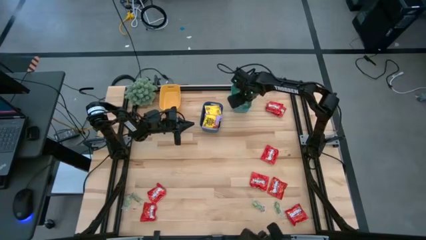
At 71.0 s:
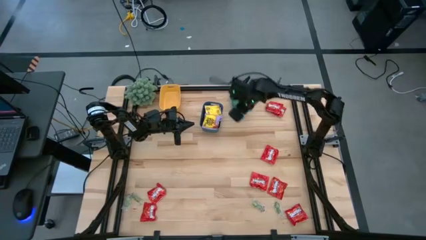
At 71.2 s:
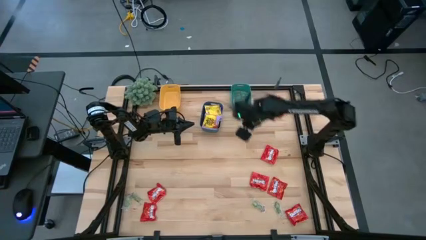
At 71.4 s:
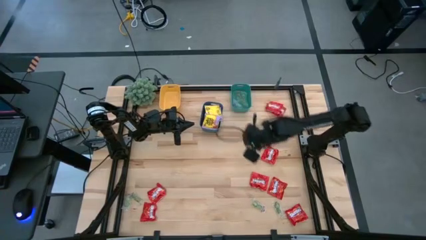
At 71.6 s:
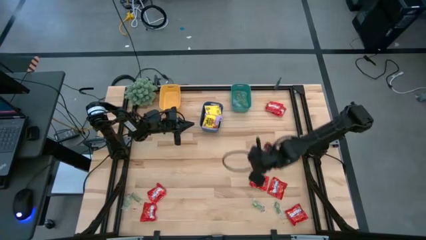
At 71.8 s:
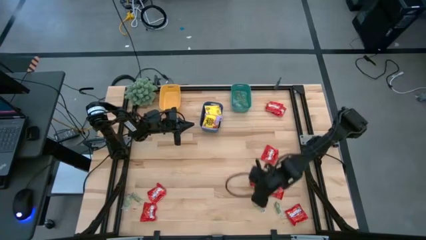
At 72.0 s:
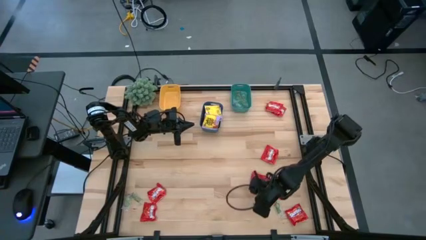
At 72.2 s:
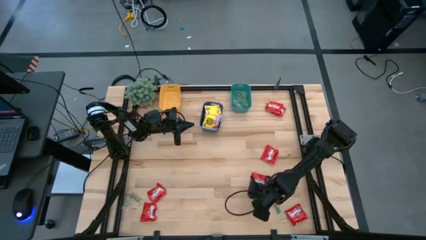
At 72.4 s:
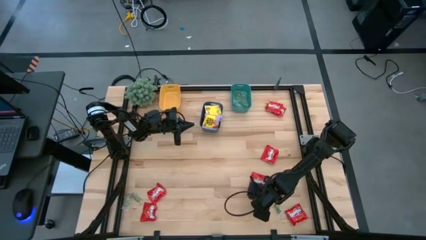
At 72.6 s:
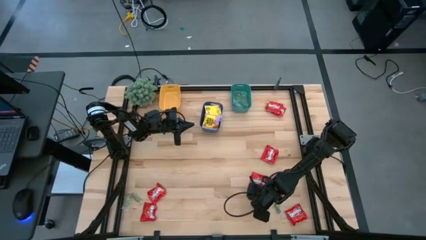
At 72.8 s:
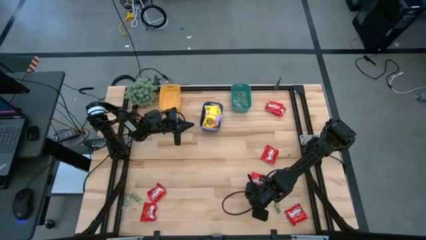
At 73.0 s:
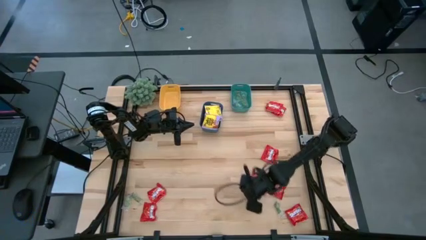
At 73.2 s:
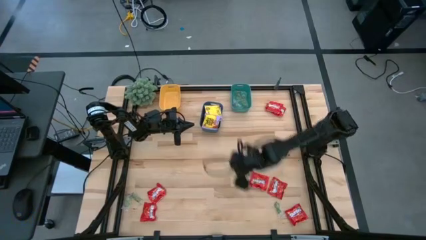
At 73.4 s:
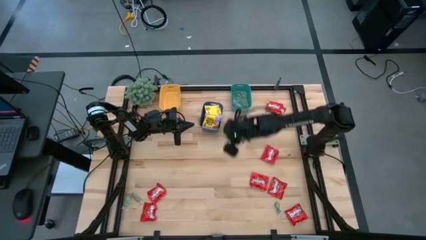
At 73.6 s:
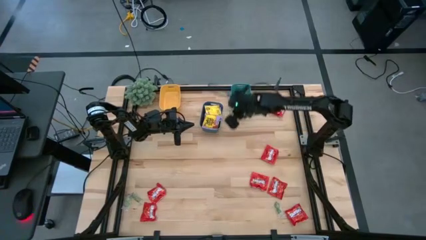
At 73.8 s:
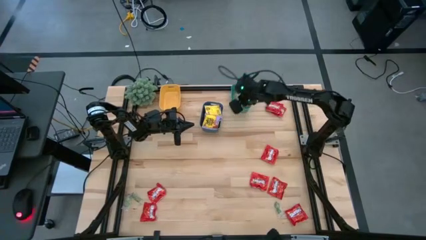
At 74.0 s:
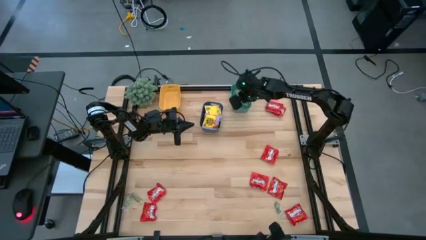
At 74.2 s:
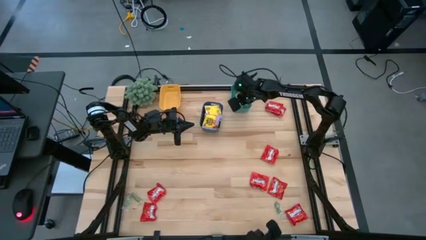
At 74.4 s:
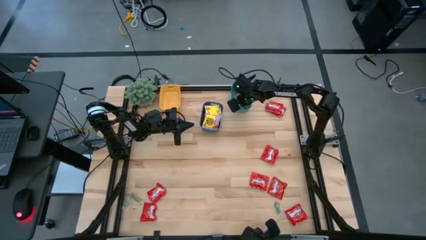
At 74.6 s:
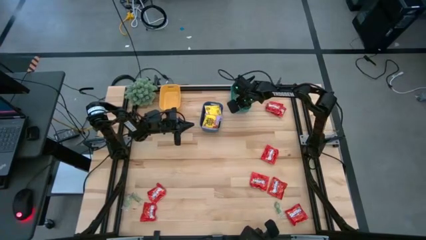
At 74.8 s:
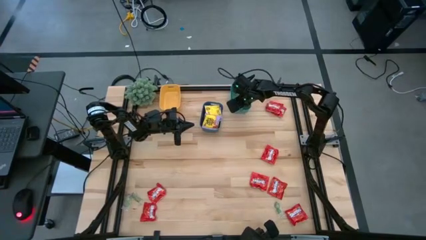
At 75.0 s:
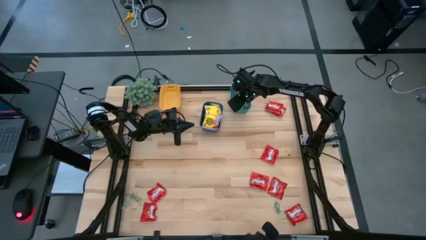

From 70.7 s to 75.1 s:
Task: Sort candy
Put the green gummy into the green bin

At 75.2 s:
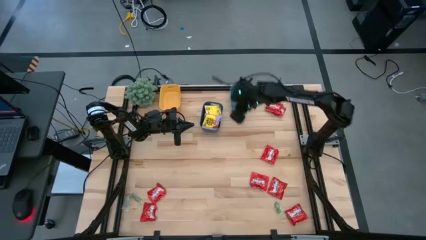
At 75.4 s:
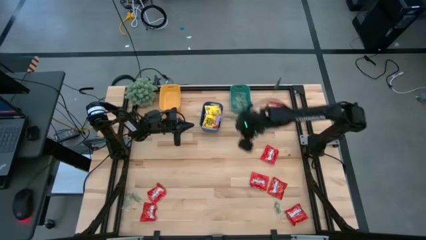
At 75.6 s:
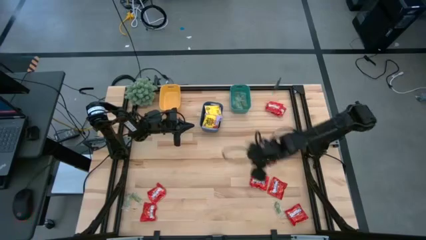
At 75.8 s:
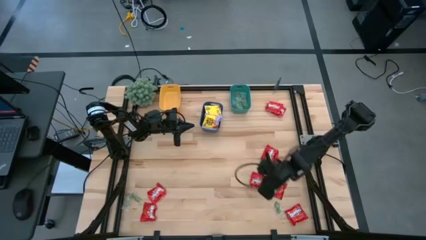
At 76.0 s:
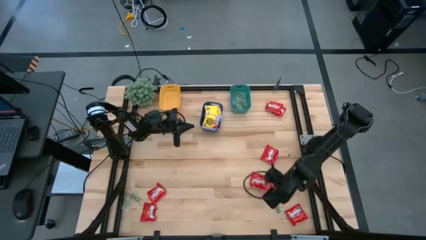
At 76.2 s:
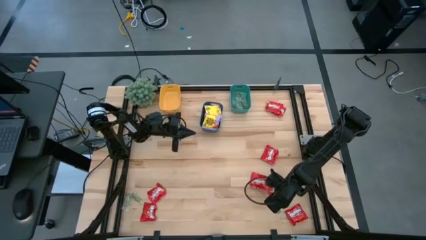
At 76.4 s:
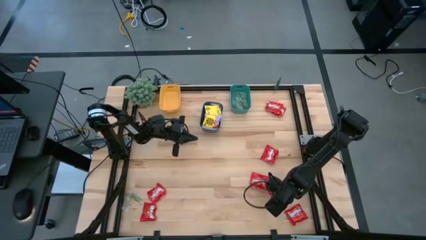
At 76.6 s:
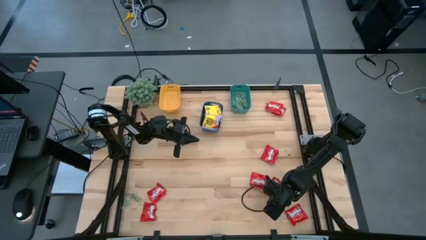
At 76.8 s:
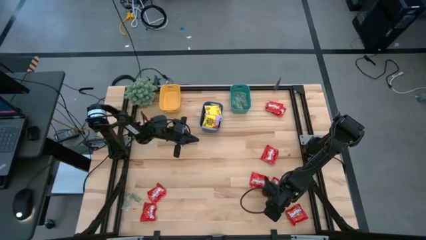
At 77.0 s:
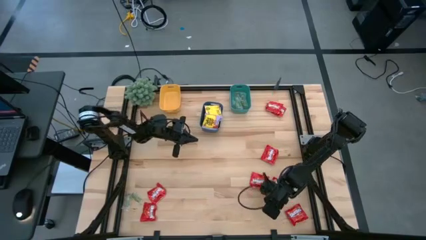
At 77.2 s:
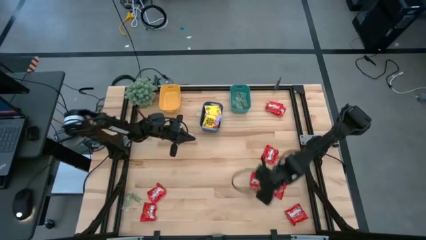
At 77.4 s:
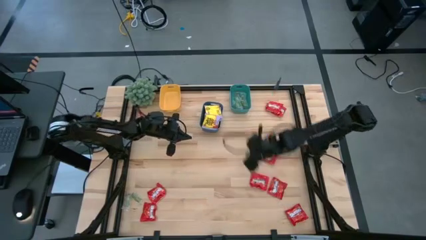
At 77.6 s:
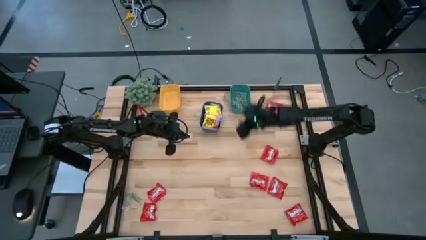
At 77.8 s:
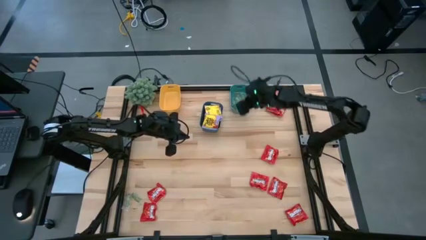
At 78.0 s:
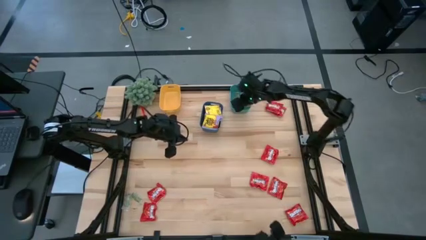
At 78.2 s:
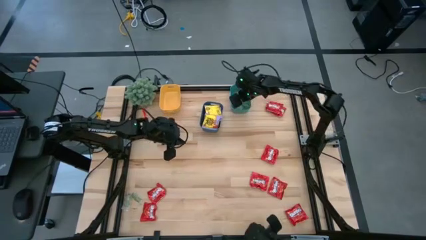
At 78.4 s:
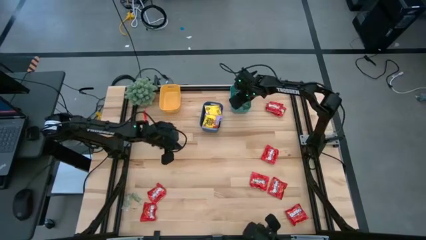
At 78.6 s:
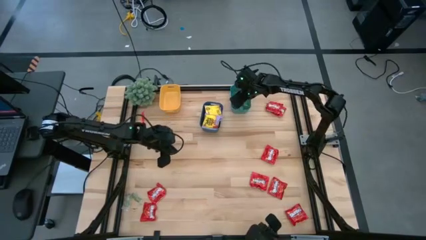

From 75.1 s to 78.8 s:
Put the green gummy into the green bin

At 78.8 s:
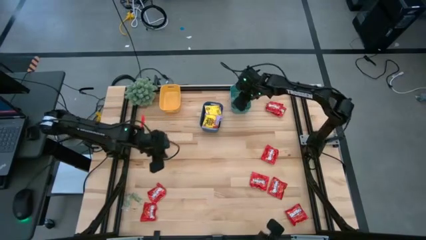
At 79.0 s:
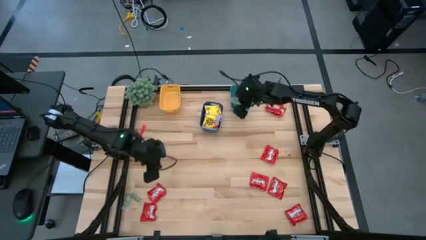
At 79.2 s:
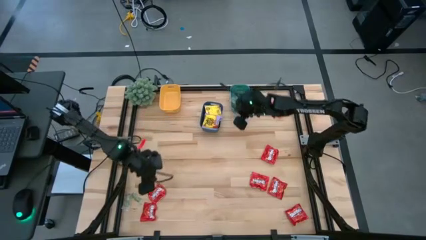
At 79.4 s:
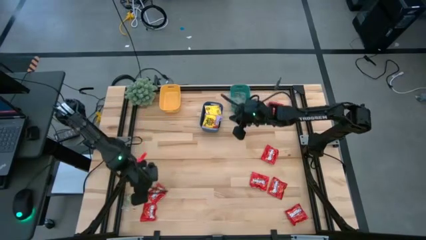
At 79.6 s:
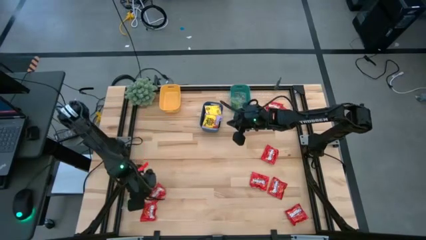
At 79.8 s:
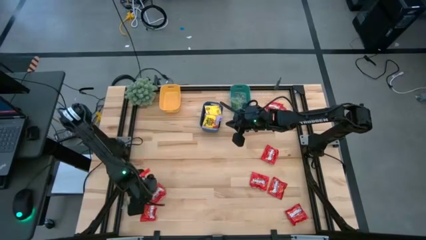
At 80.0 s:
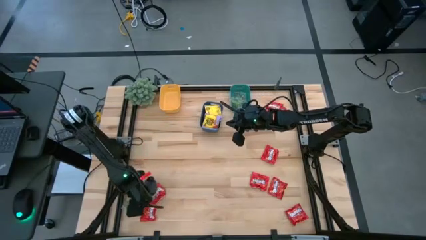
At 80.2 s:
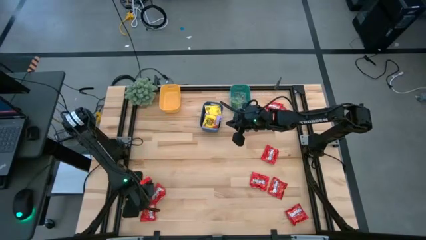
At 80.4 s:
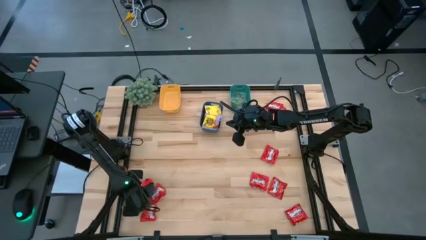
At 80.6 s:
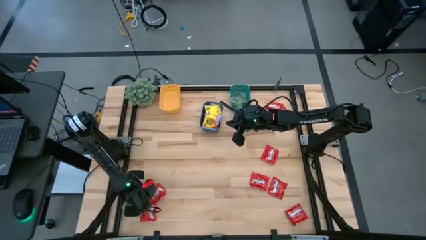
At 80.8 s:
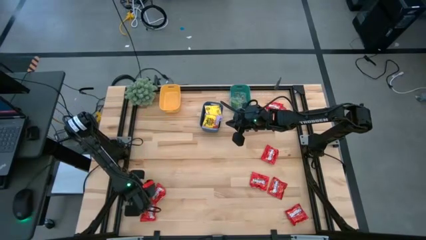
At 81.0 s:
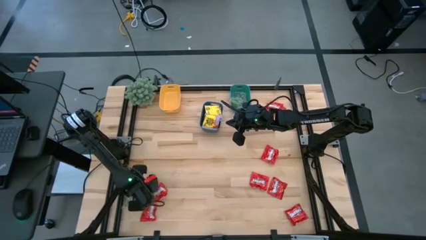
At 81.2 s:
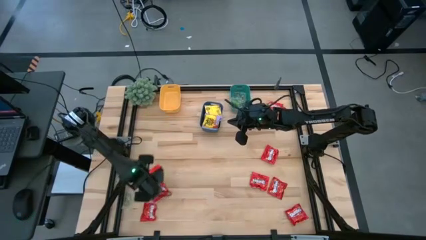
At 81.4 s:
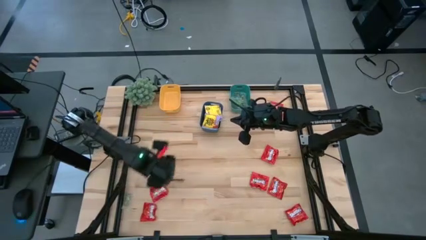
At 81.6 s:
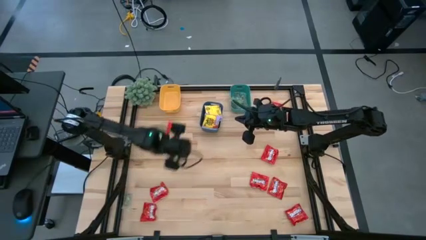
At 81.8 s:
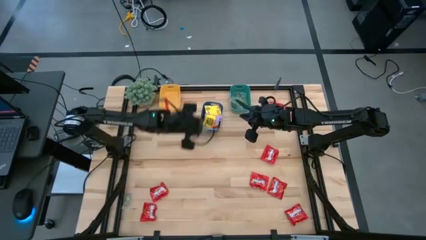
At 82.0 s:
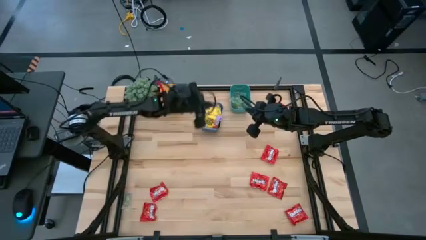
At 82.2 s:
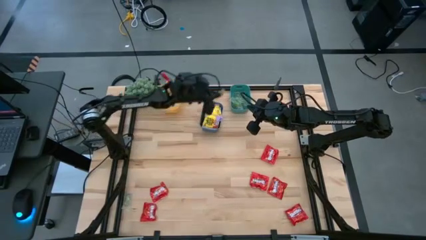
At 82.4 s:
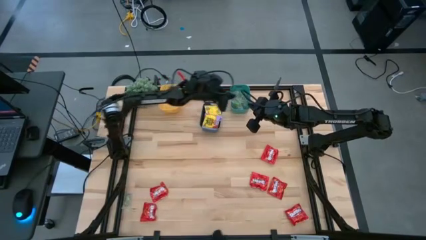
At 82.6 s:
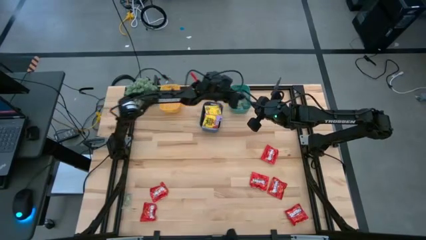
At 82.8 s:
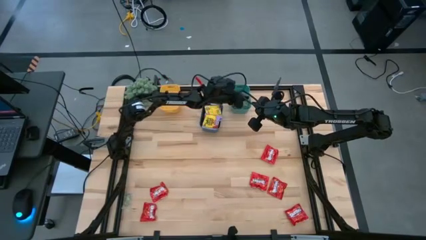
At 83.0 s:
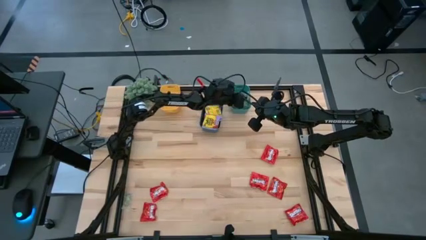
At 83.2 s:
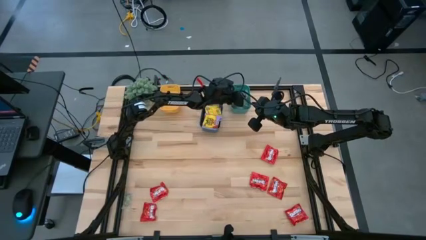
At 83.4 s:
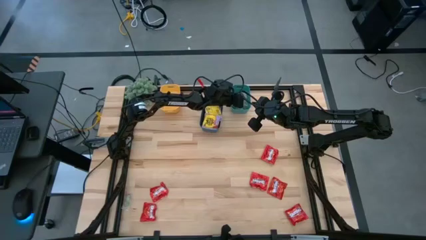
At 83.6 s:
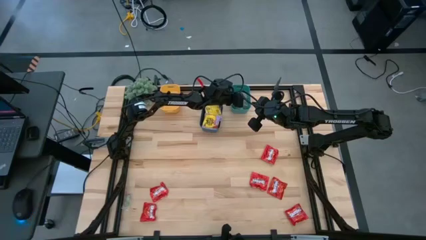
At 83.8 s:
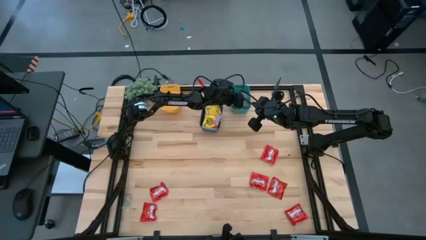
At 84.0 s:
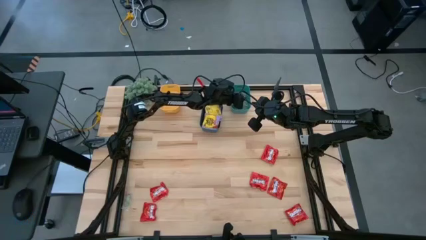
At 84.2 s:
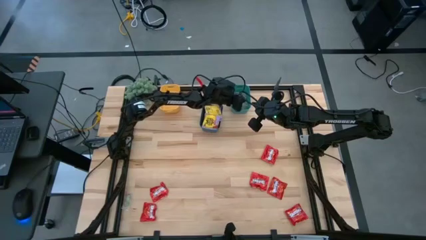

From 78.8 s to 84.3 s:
Put the green gummy into the green bin

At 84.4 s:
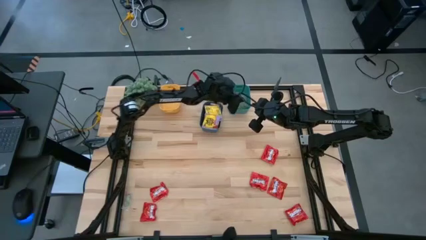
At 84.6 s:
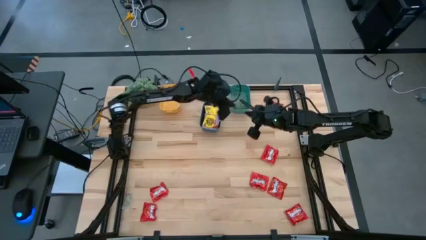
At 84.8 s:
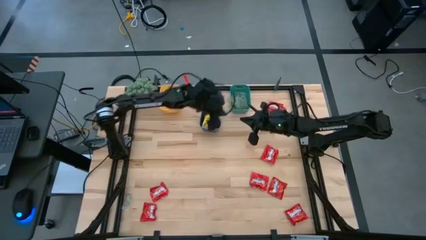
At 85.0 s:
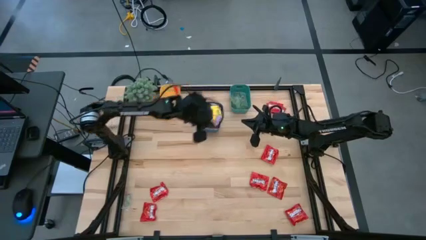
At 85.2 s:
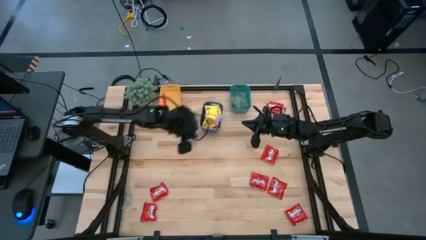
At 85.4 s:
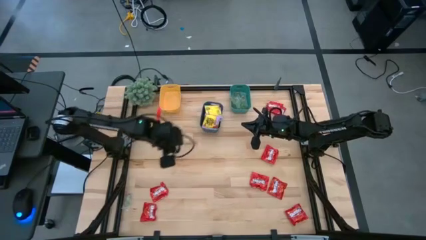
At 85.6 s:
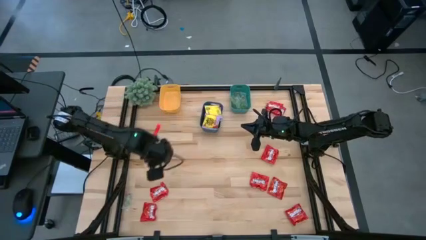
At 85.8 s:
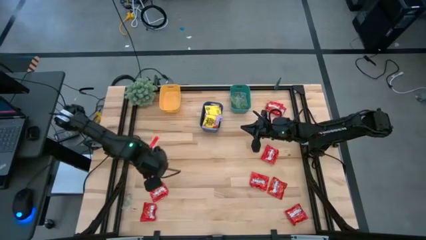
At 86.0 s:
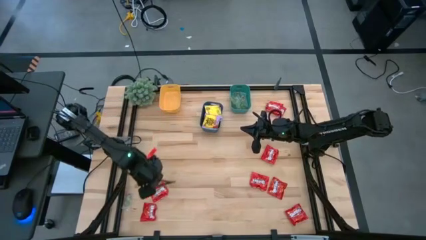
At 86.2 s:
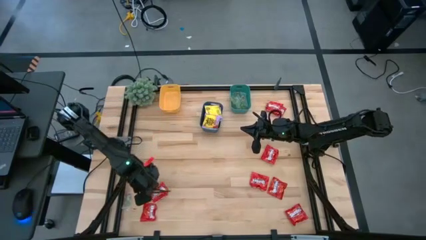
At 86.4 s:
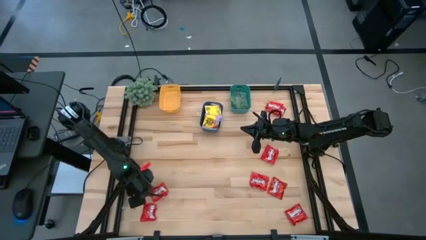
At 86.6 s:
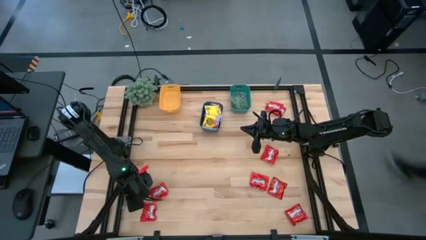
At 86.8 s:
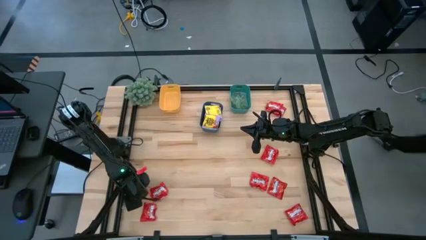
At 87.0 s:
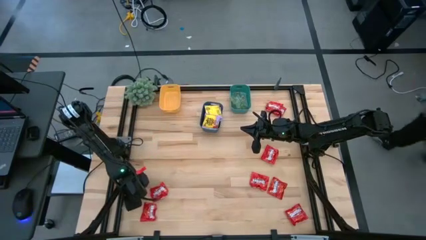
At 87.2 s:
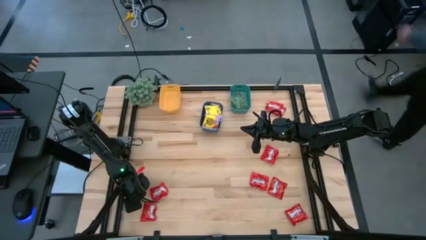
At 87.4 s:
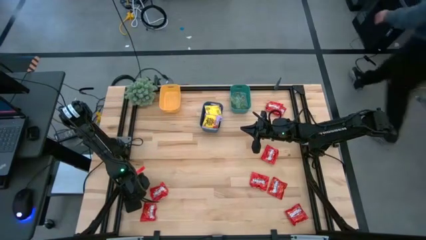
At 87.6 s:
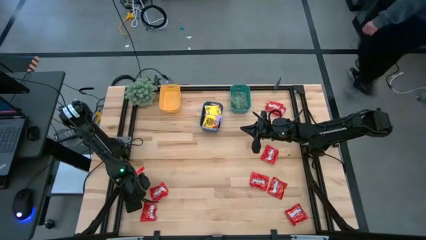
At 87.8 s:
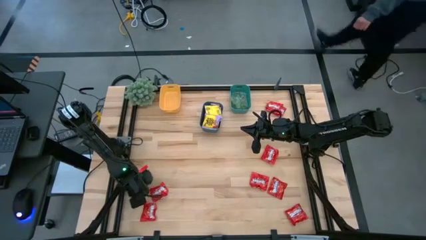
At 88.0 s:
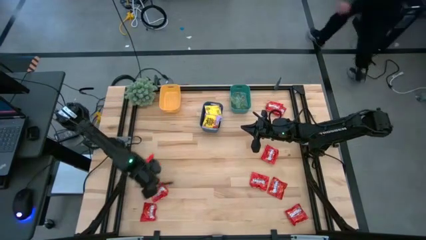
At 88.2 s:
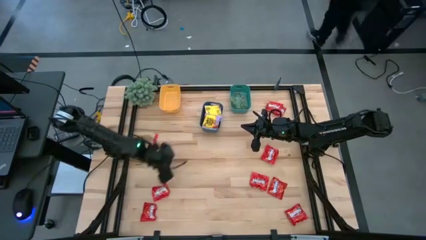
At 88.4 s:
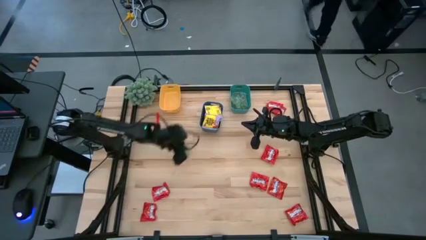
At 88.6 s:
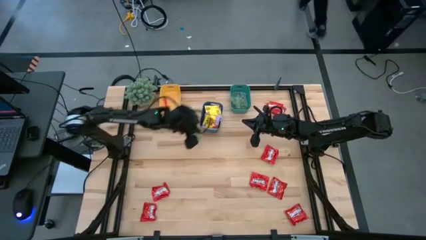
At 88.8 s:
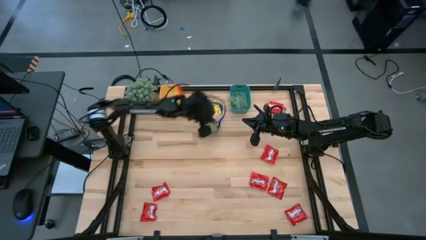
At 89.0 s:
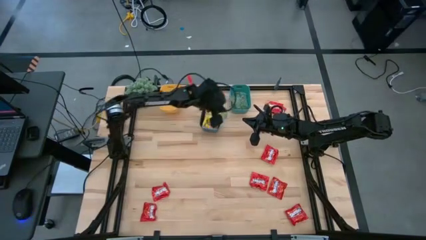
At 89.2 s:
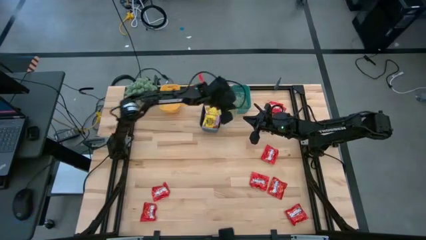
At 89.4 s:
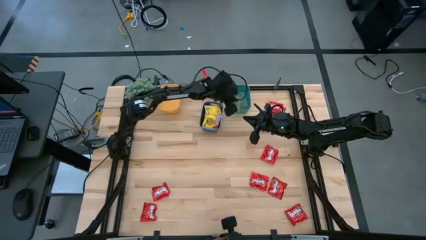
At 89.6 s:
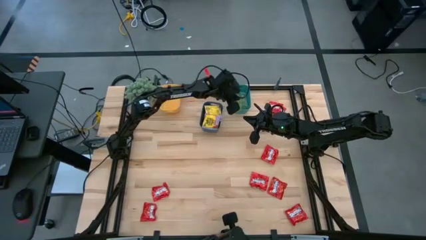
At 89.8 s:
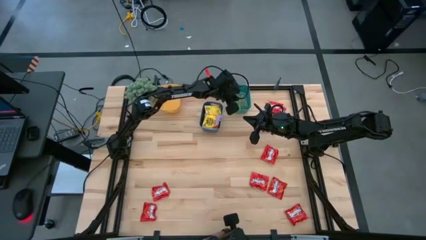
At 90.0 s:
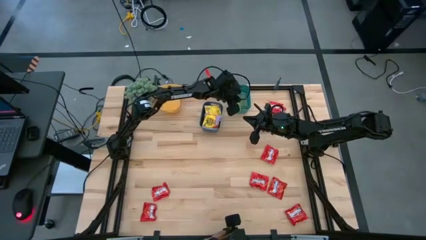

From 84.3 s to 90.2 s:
Put the green gummy into the green bin
